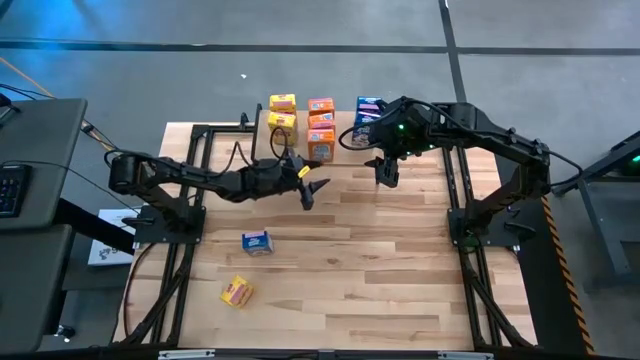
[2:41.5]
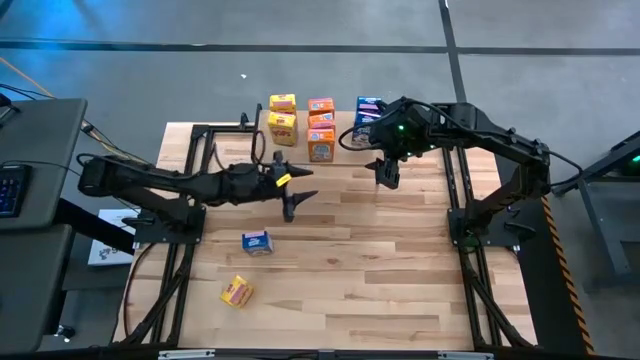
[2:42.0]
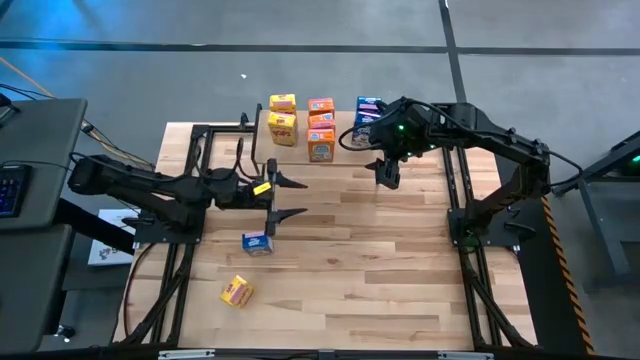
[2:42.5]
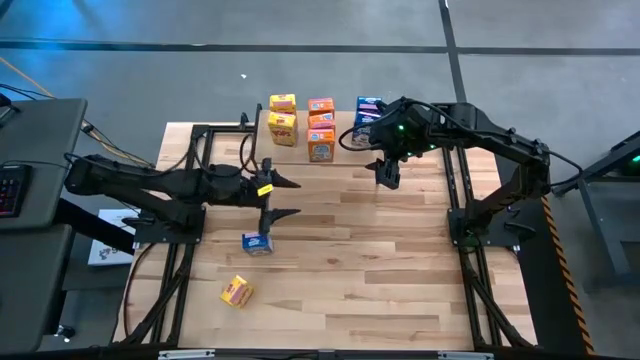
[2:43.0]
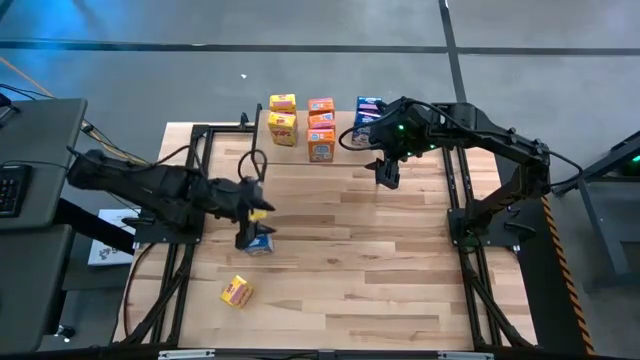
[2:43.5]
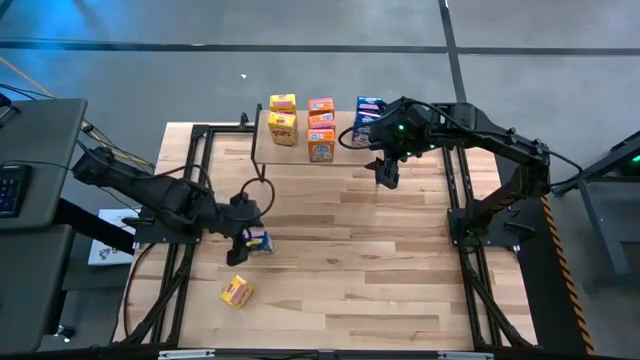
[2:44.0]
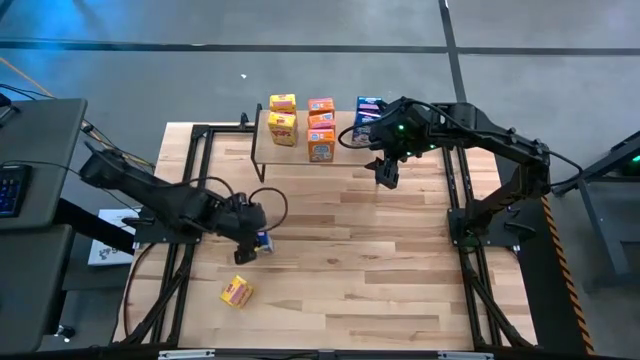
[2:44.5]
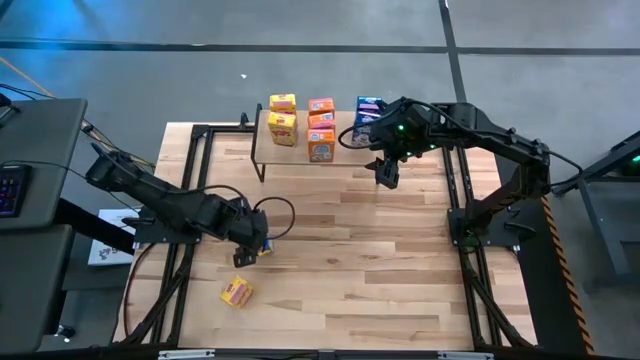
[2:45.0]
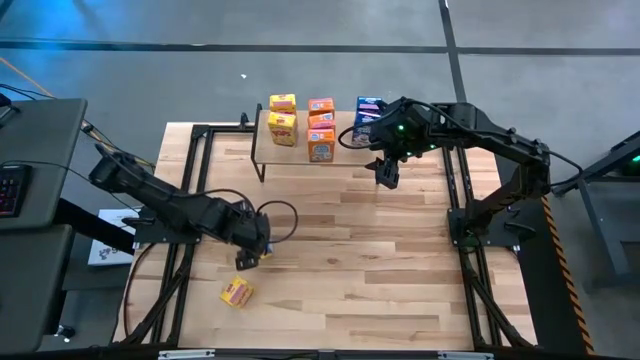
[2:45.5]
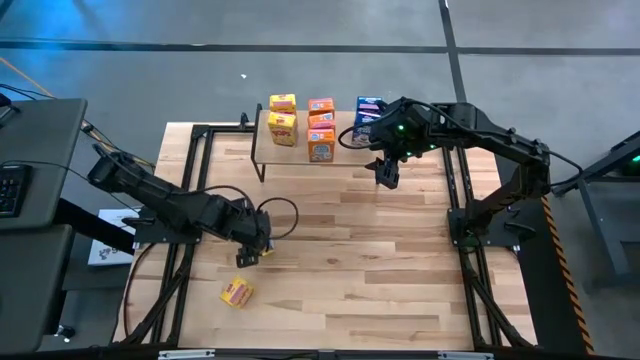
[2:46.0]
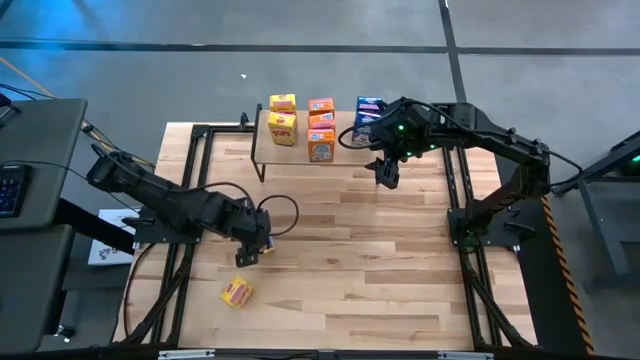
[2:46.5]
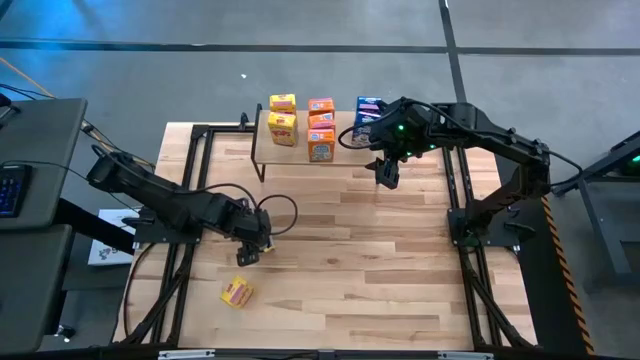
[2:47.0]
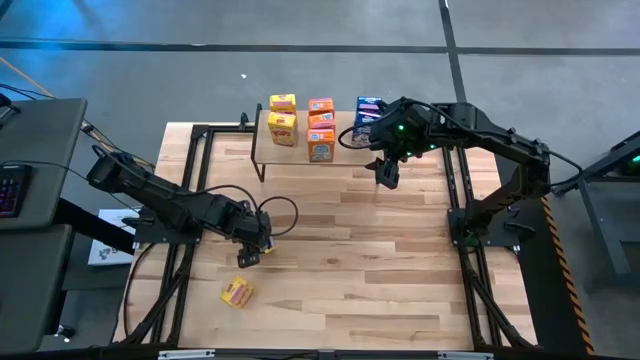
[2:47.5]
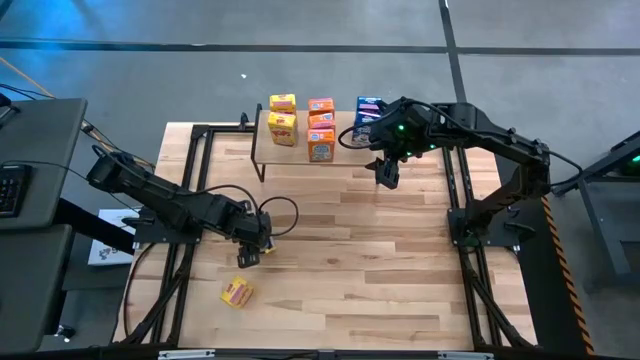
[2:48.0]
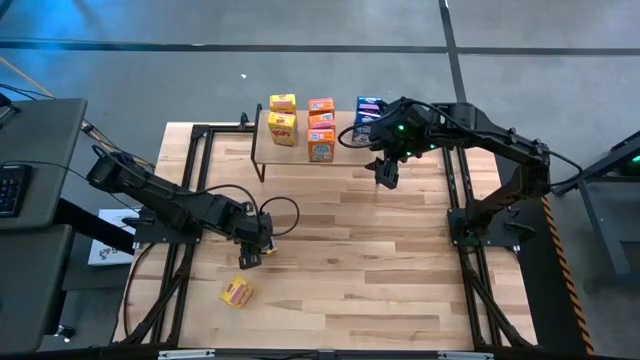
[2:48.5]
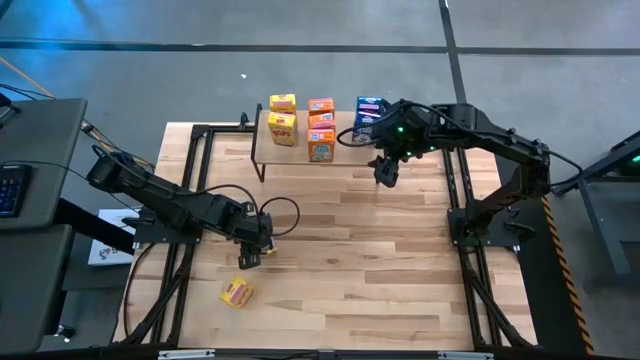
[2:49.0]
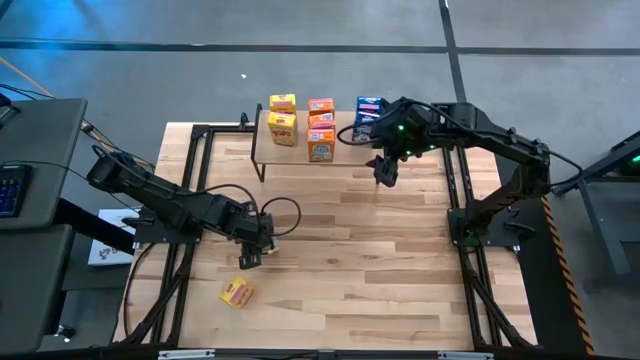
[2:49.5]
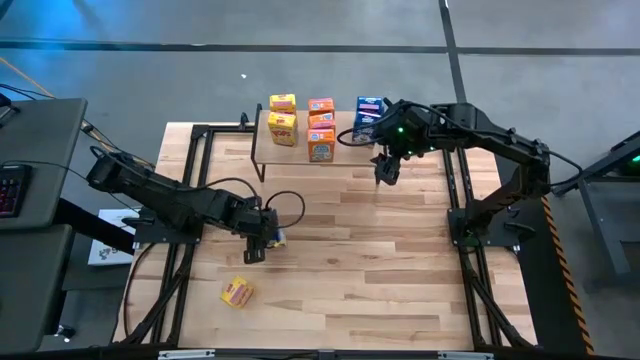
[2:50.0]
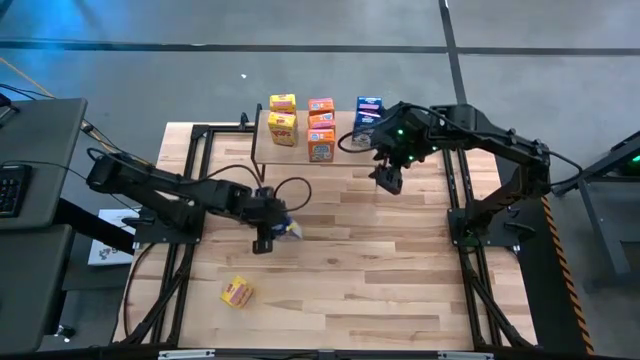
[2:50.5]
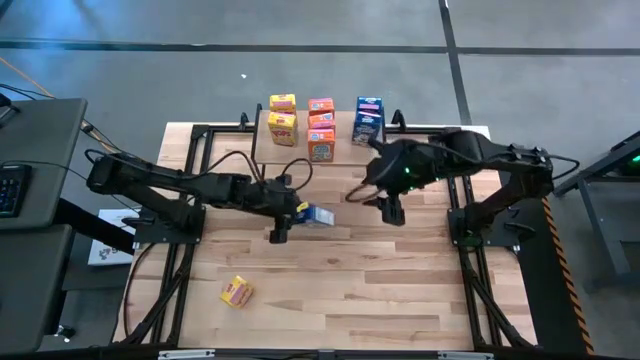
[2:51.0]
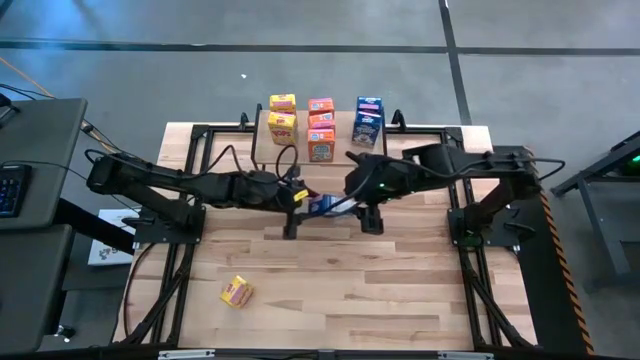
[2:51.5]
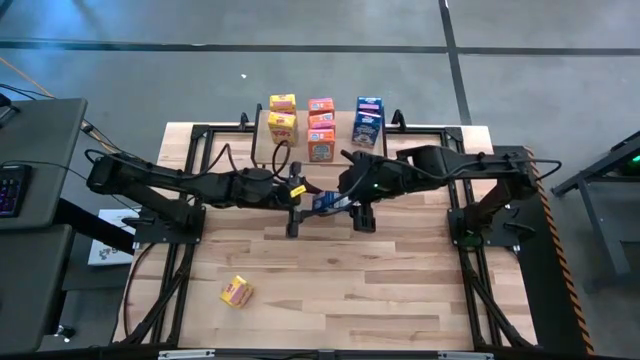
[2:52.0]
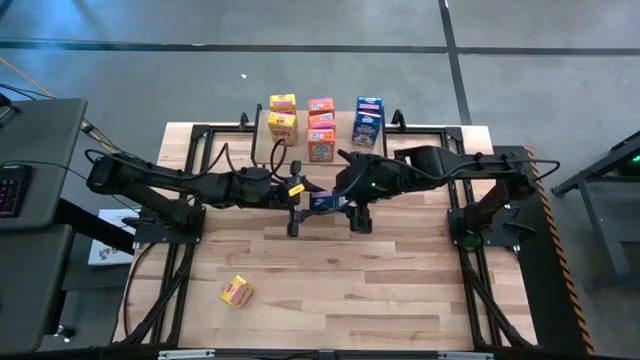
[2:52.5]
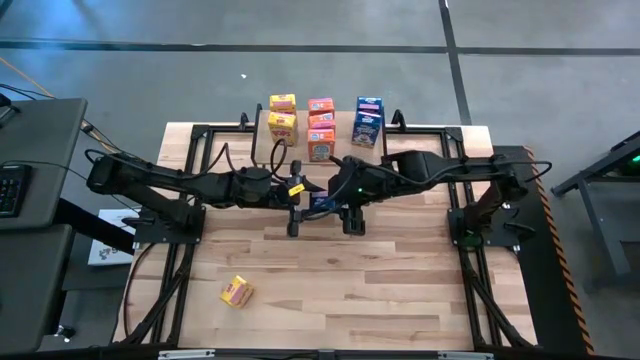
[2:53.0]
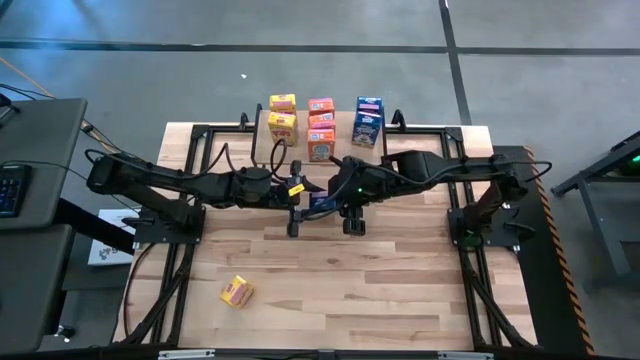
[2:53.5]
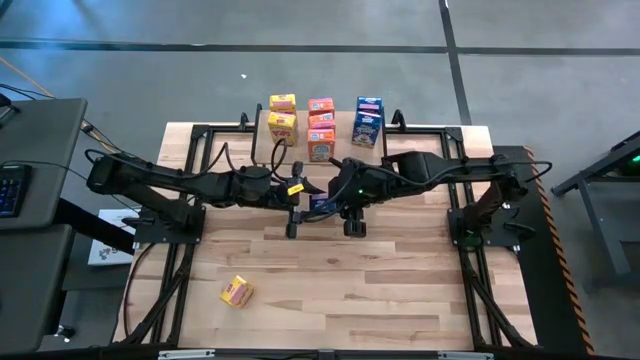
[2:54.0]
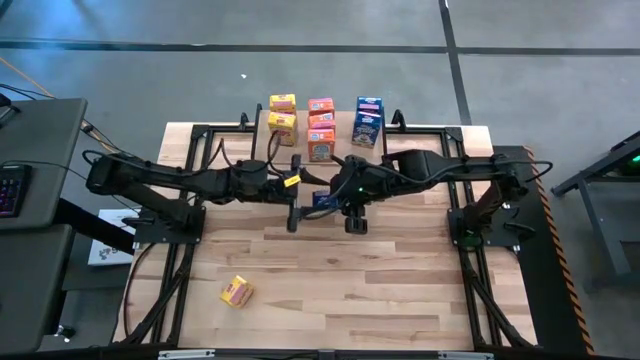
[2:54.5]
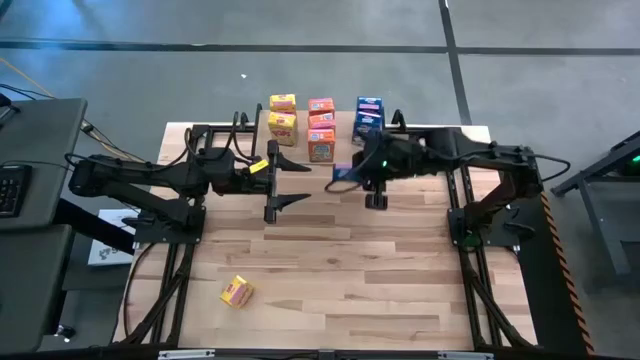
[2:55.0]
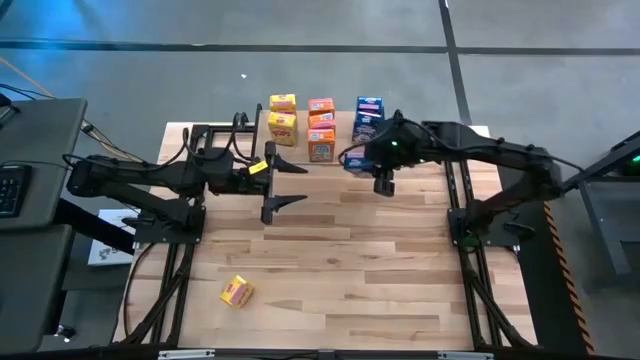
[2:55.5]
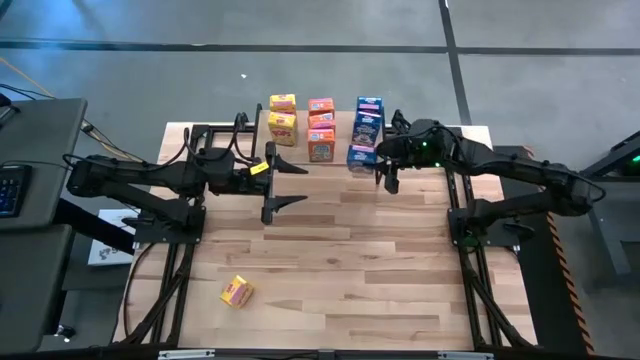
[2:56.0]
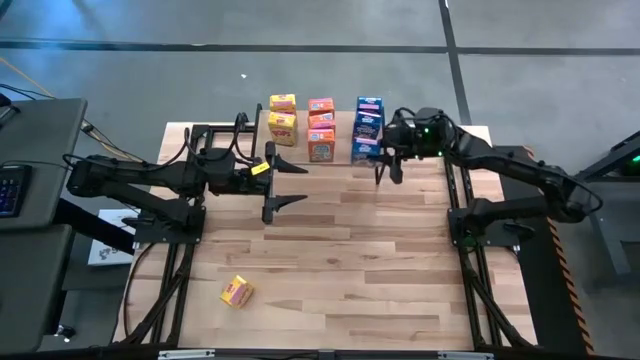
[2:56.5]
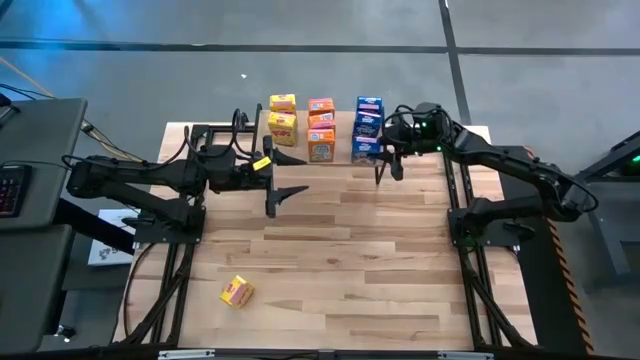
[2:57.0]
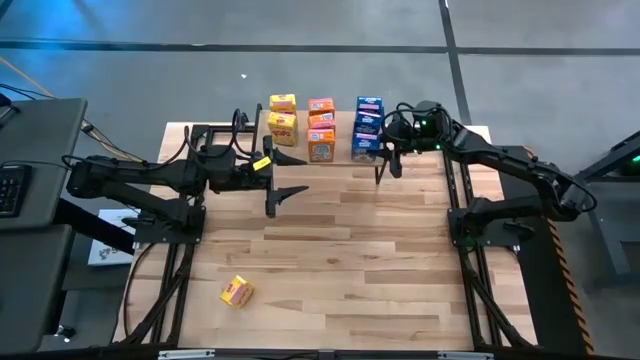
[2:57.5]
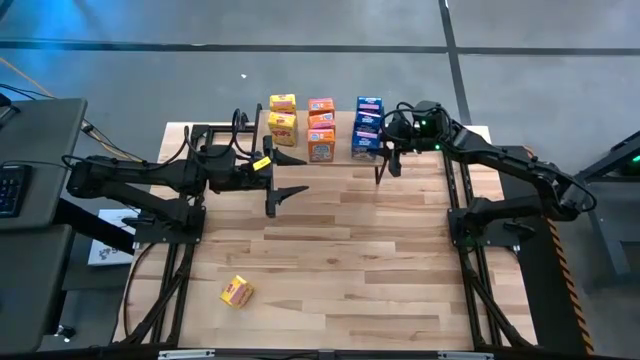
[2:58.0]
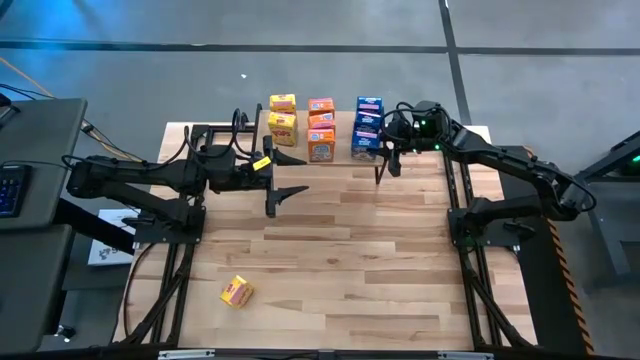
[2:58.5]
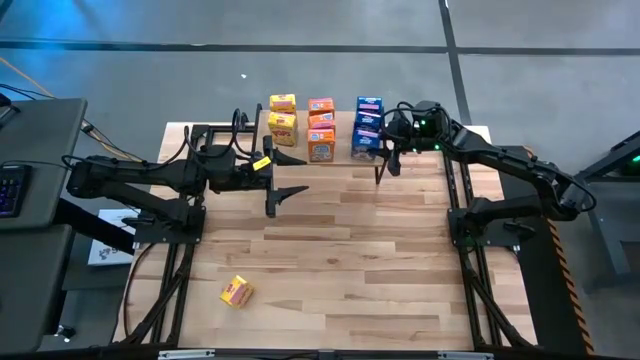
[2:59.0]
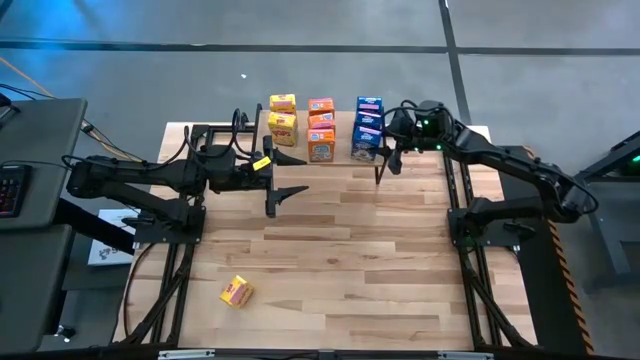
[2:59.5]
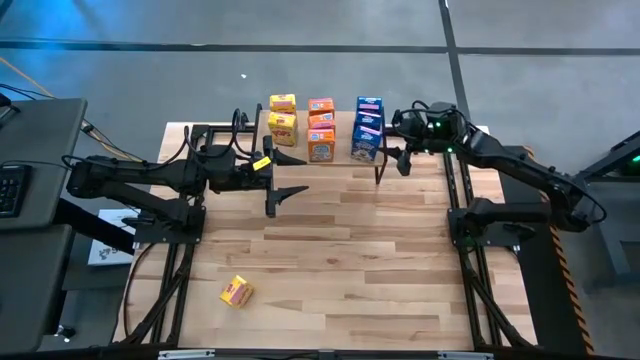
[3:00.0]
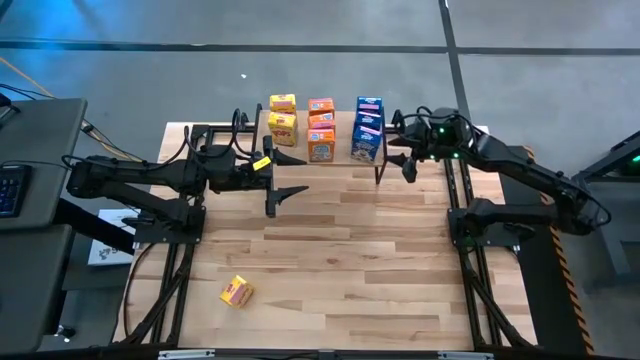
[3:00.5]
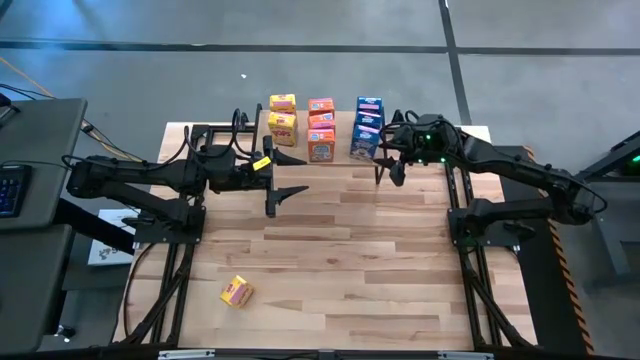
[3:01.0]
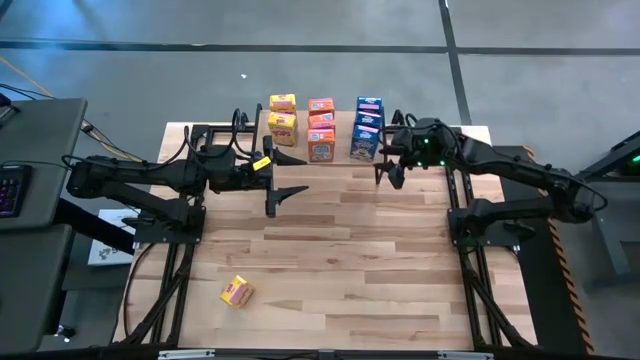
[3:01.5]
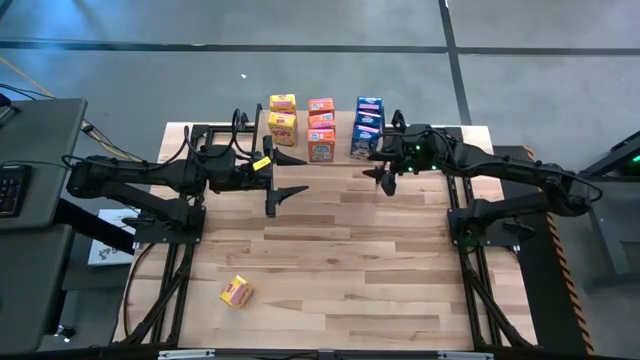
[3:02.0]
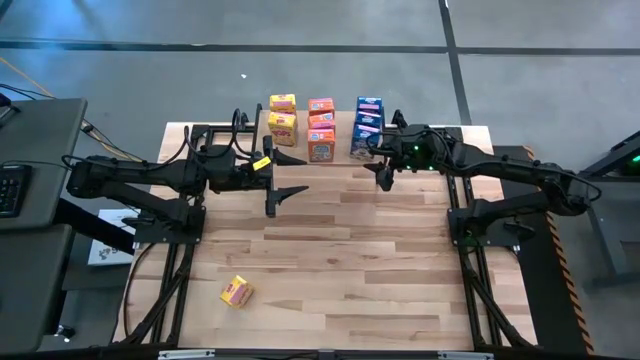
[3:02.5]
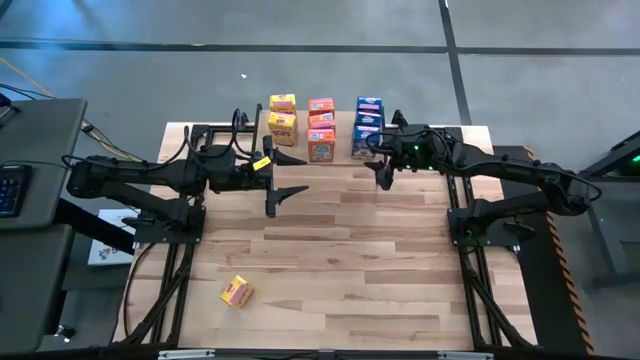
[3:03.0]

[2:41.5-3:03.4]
Task: Stack cereal on shelf
Put the blue cereal box on the shelf aligned with the other blue cereal boxes
